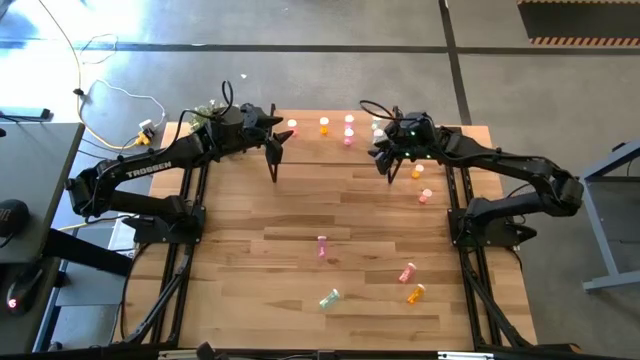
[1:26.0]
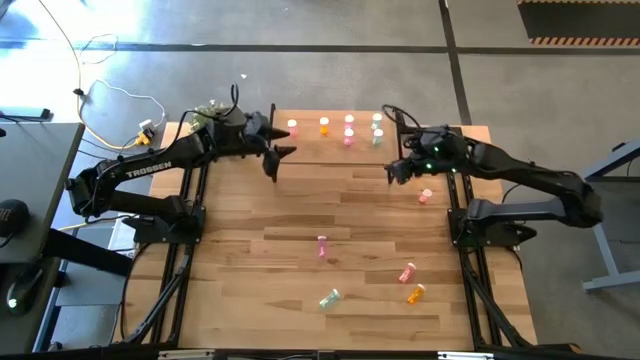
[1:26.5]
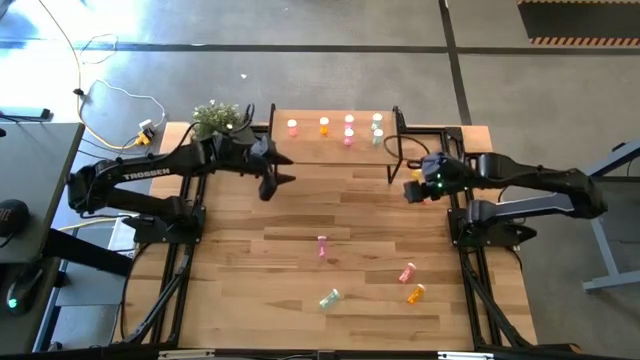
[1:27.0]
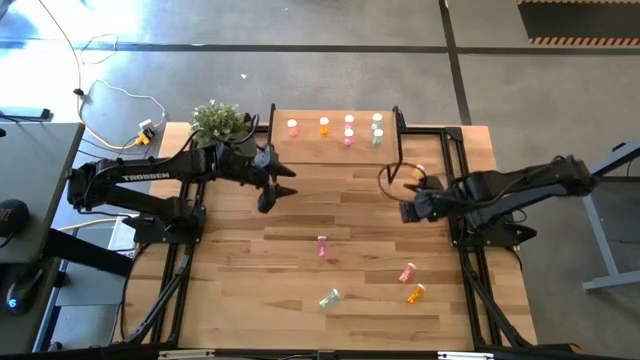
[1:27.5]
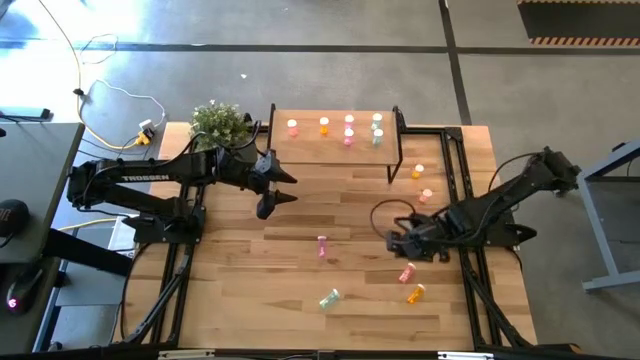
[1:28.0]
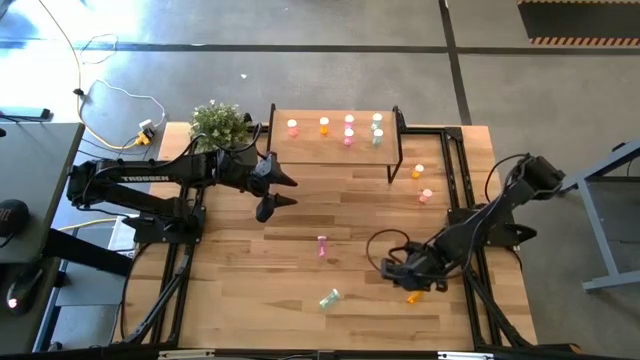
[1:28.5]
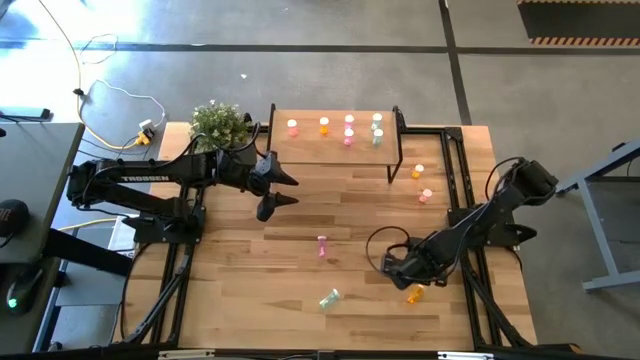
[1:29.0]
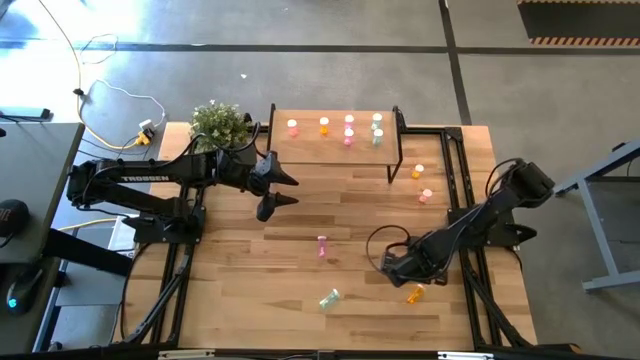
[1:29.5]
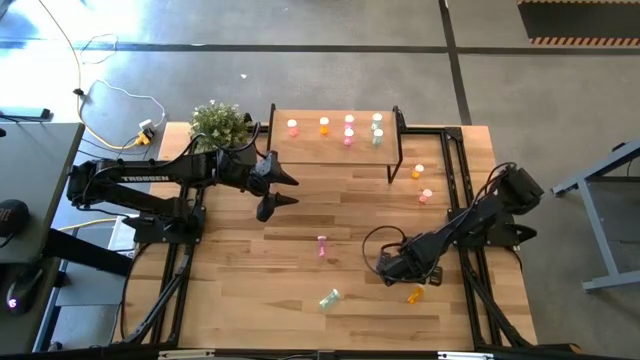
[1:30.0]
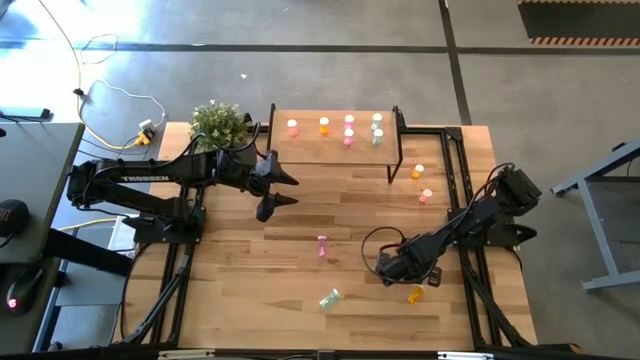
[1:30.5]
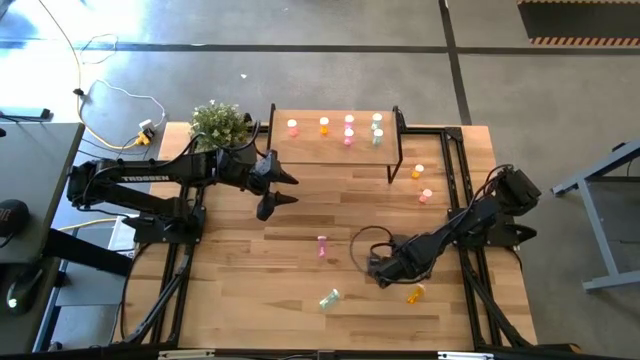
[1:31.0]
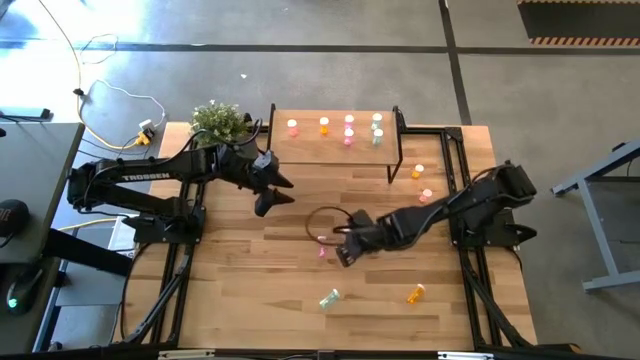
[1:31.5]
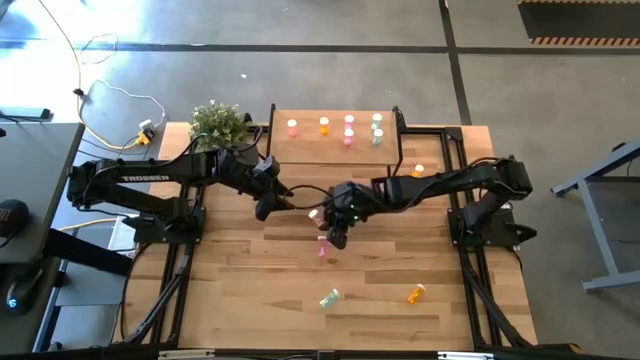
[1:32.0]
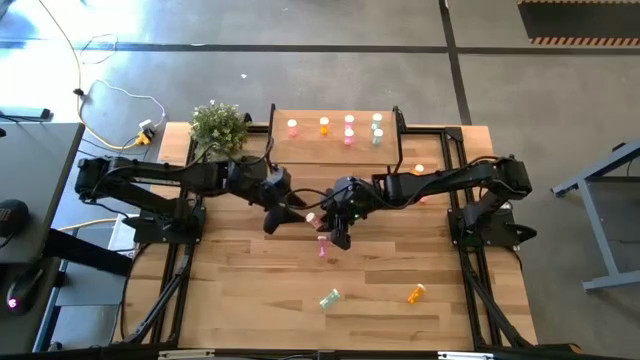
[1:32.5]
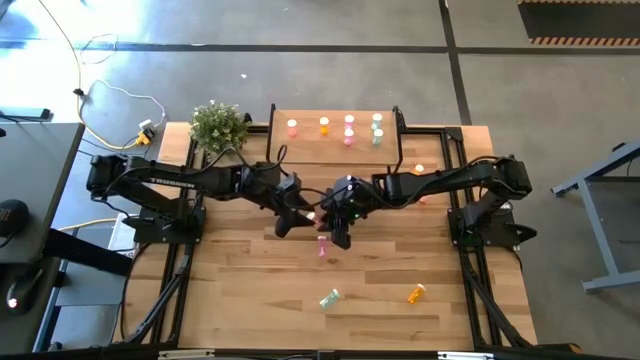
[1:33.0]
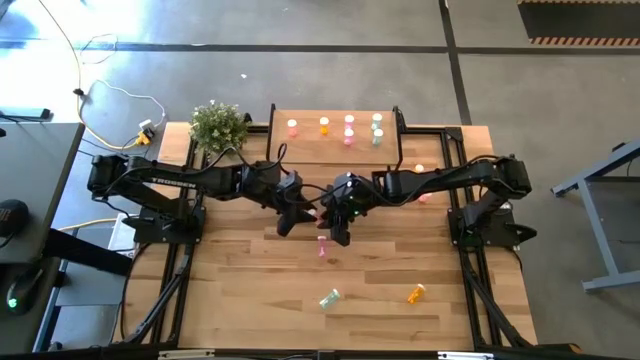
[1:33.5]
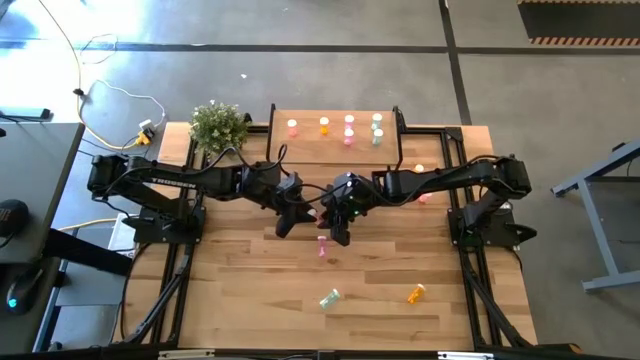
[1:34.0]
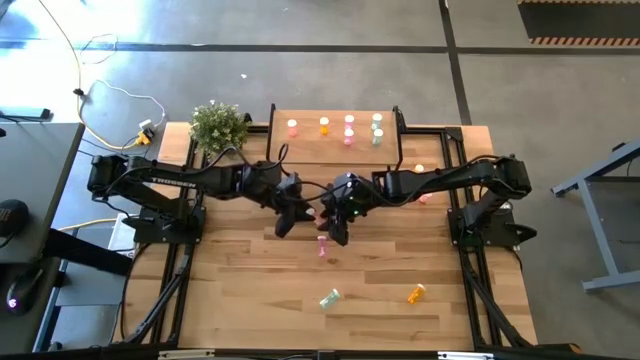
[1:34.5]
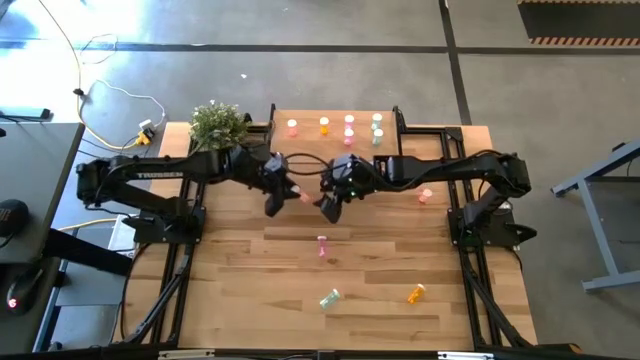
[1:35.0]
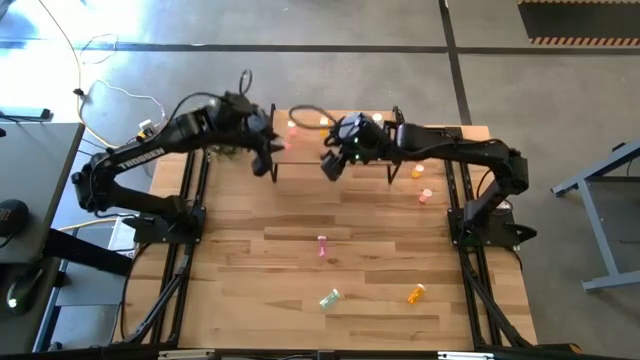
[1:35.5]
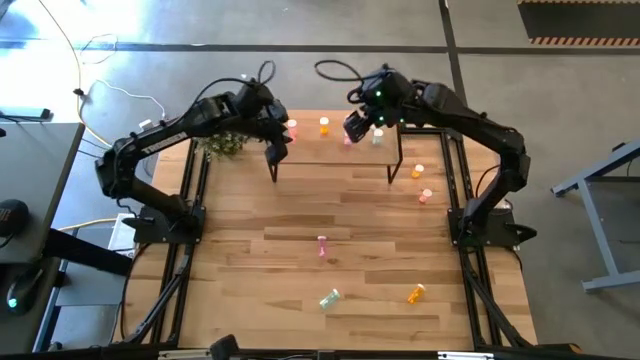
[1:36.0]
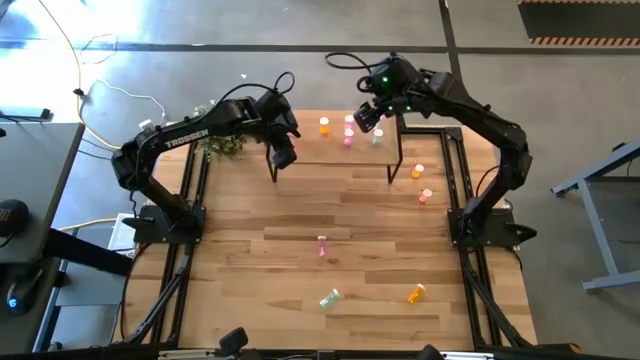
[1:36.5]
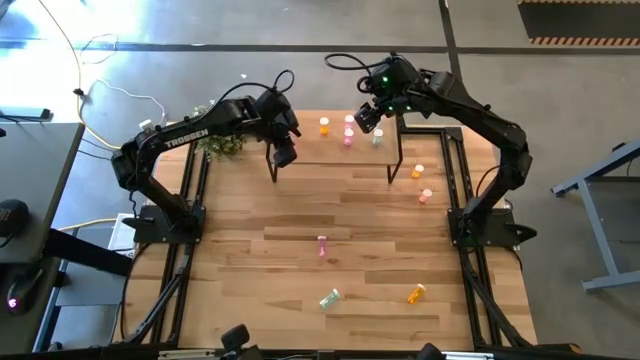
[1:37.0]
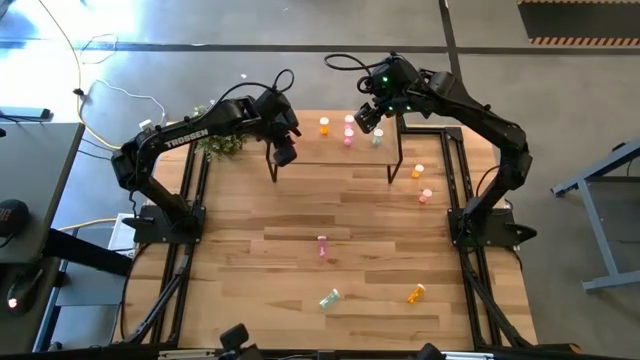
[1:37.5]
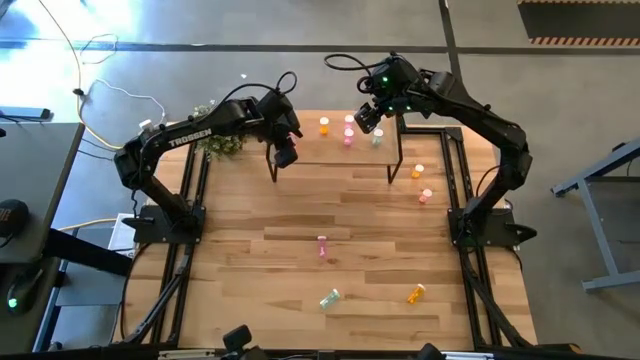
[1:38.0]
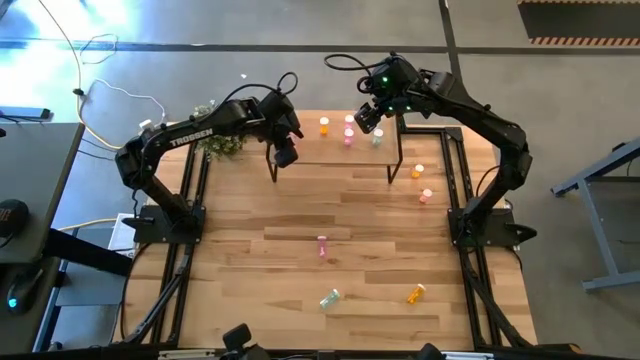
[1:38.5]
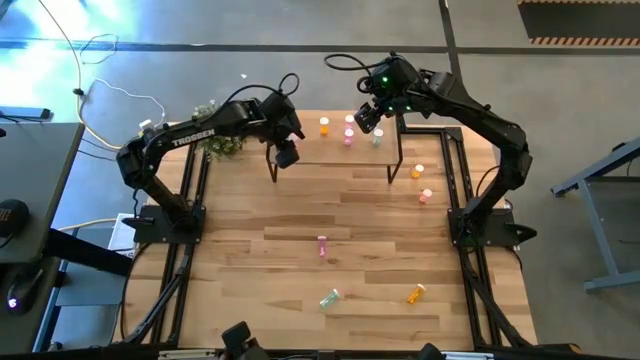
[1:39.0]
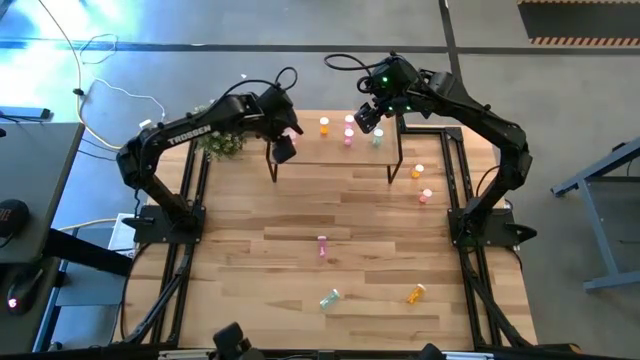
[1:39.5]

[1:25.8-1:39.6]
Task: Pick and place medicine bottles onto shelf by color
Put the bottom pink pill bottle on the shelf aligned with the other pink pill bottle

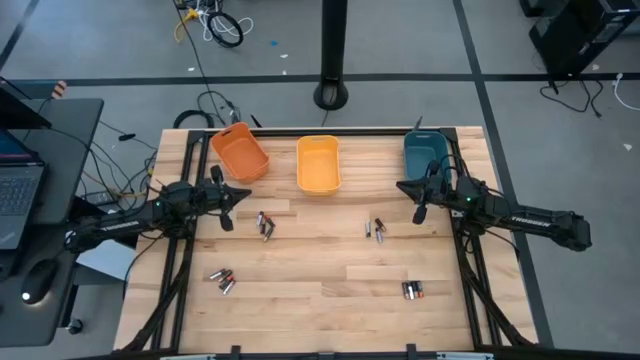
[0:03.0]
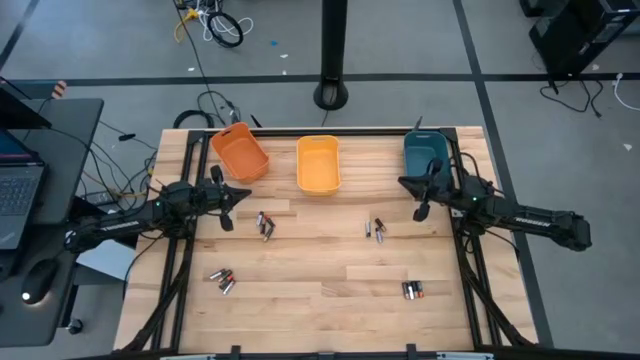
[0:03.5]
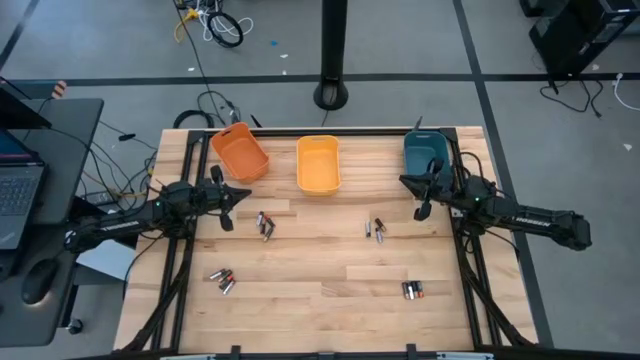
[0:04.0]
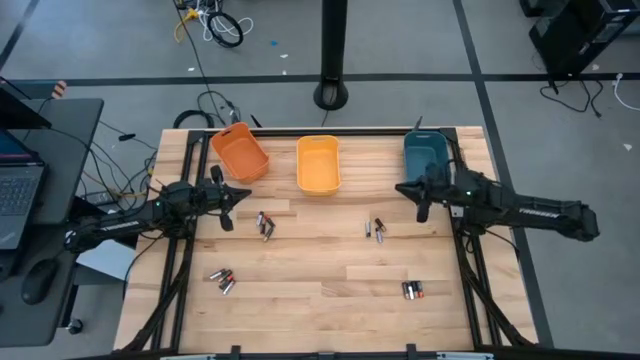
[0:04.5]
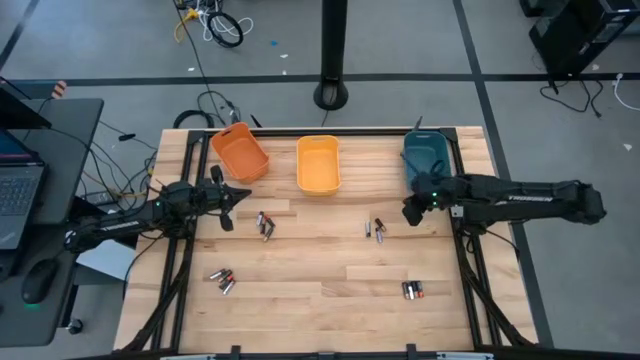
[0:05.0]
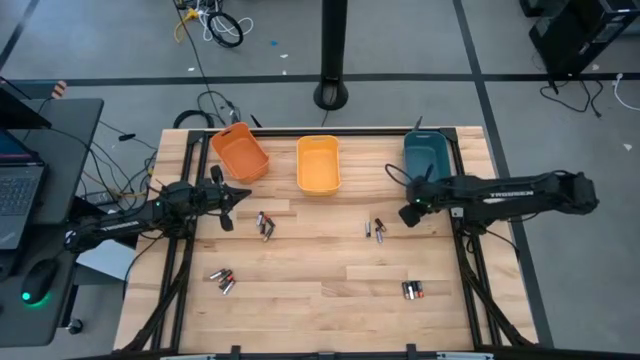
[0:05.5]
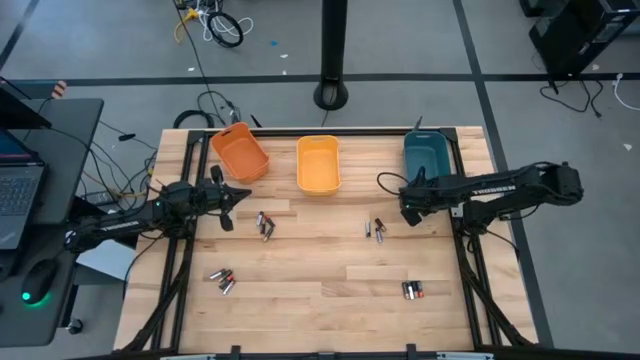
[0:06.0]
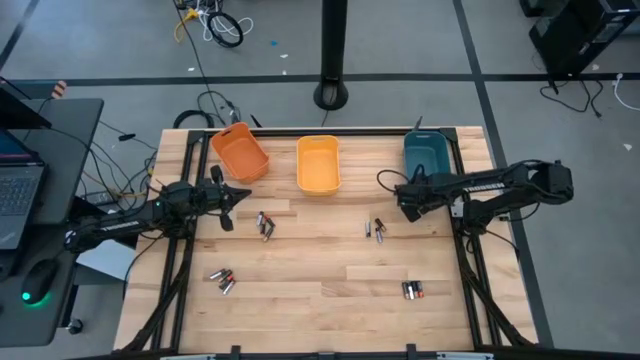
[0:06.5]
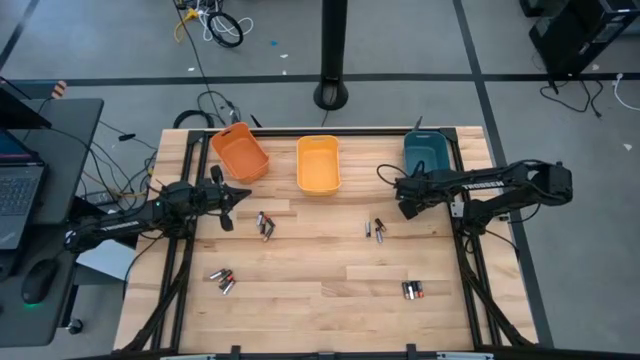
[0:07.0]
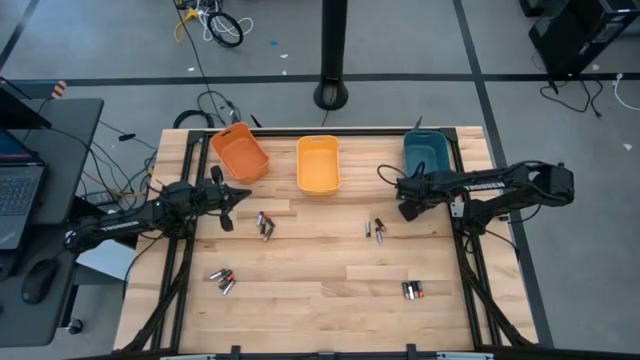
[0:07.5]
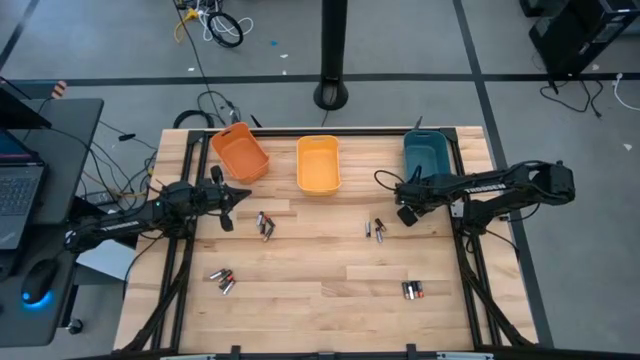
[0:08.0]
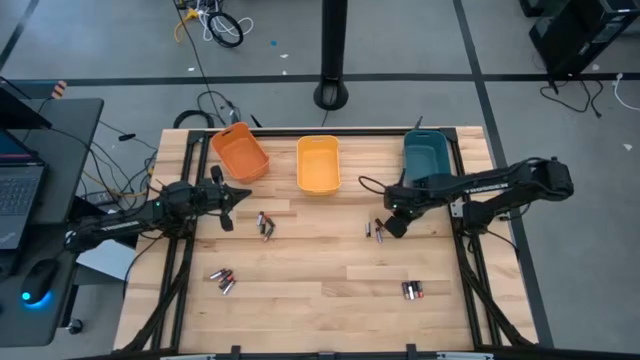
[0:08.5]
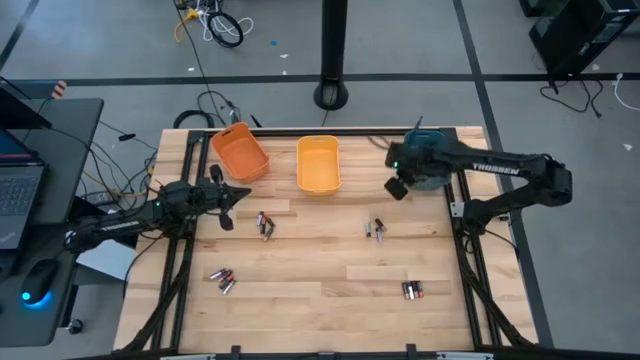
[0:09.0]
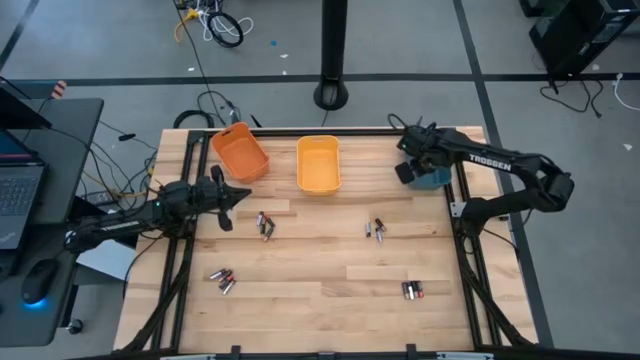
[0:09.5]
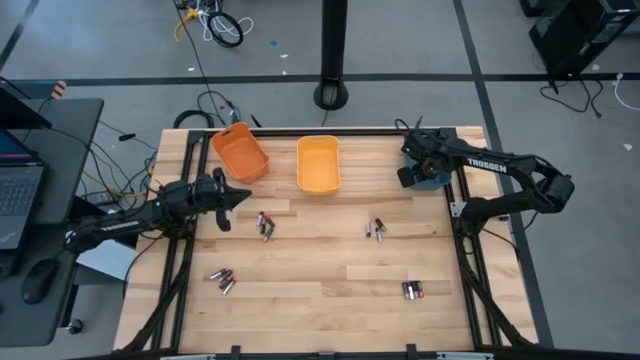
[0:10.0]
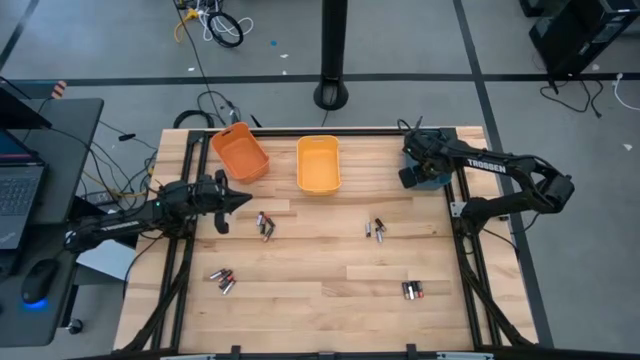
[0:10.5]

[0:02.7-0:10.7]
Task: Sort batteries
Put the orange battery into the blue bin
